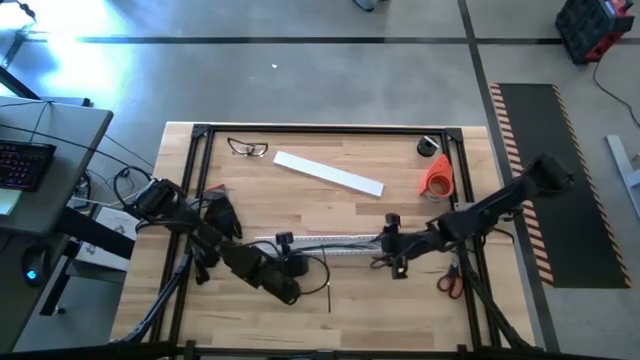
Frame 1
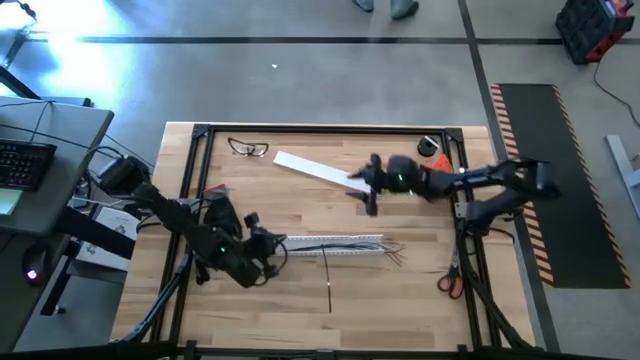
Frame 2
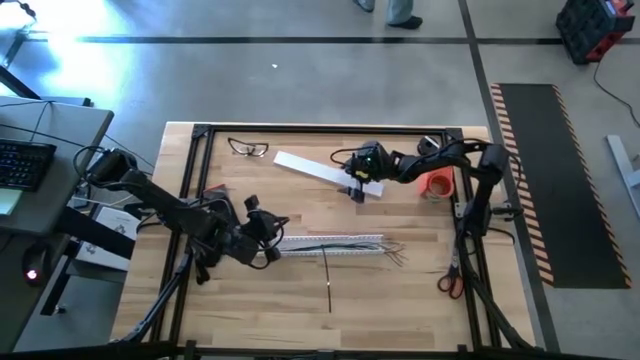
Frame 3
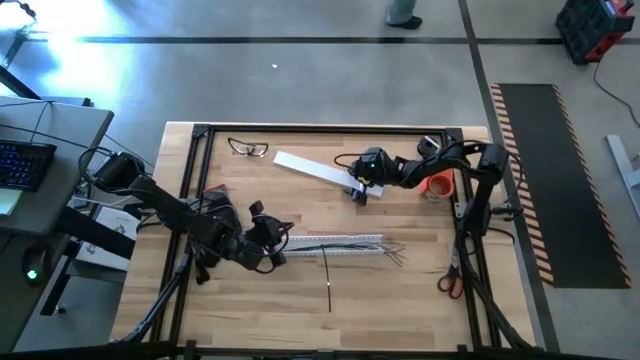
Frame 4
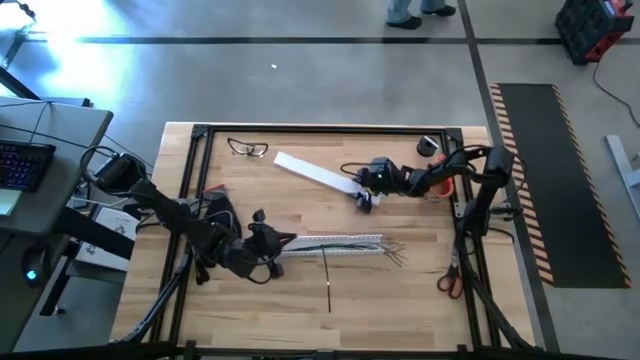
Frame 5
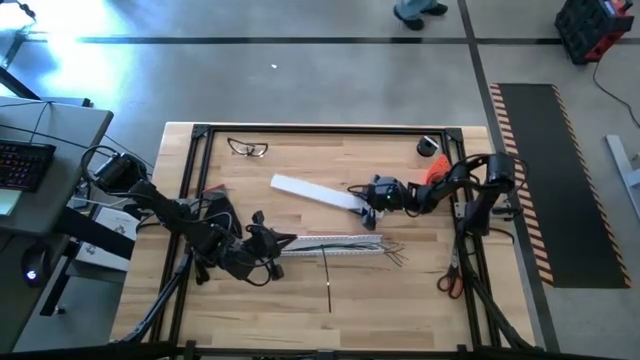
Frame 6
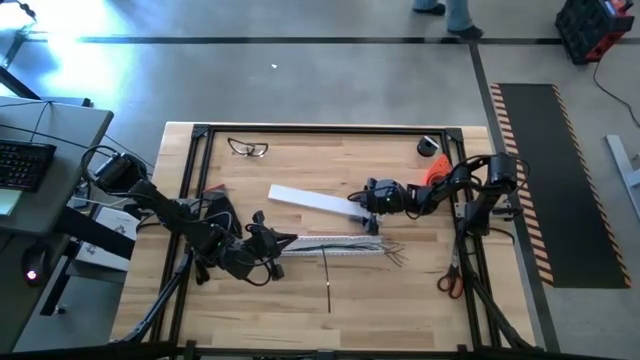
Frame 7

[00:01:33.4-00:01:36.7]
Task: Ziptie cables
Insert the white cable duct cover into the white cable duct

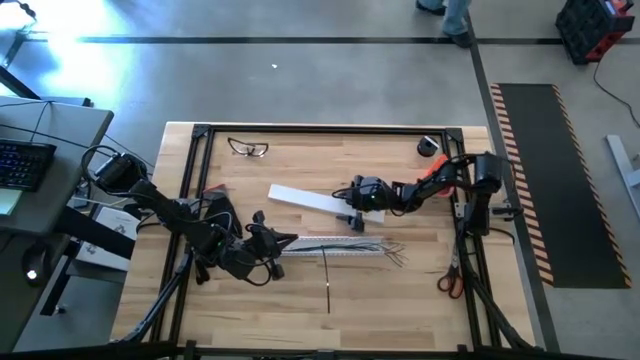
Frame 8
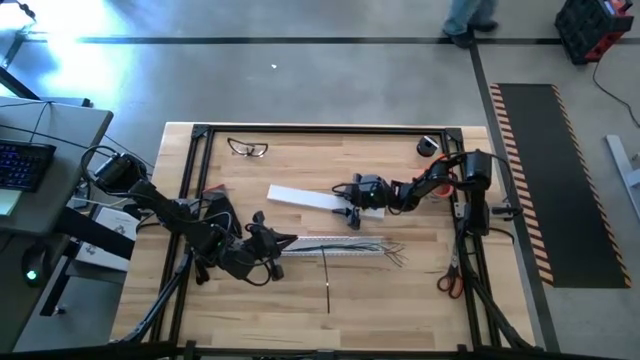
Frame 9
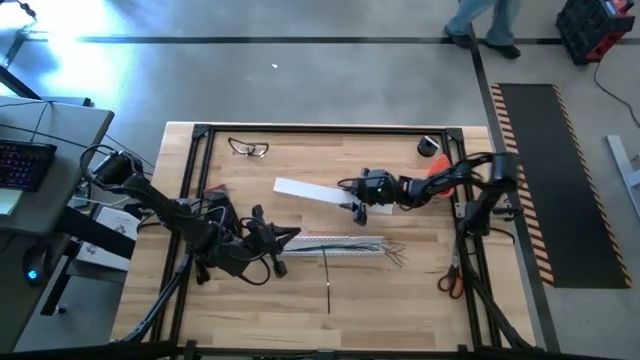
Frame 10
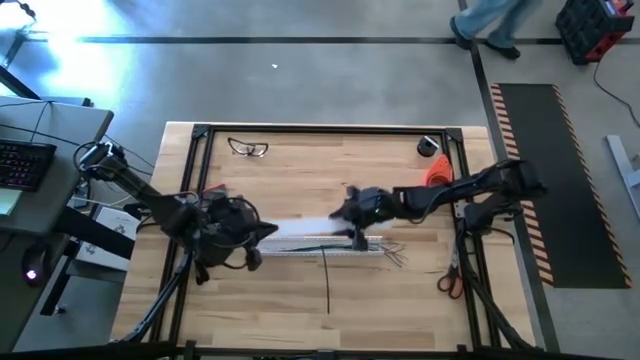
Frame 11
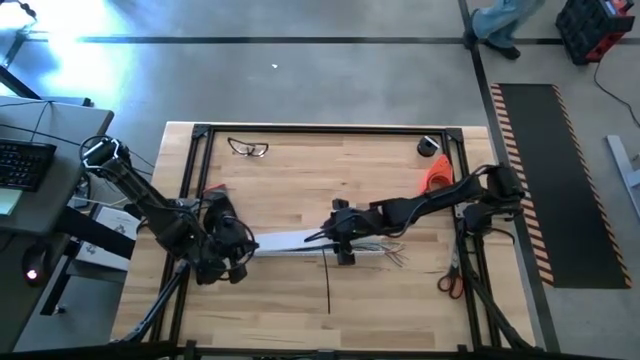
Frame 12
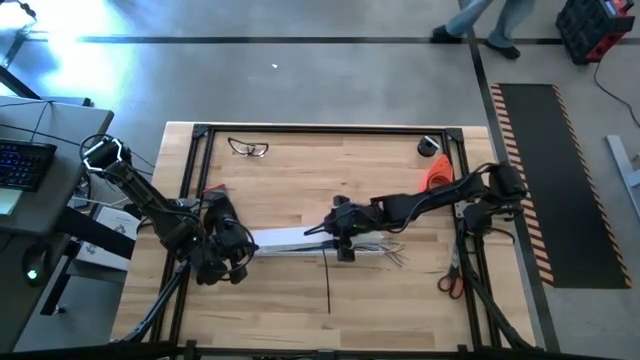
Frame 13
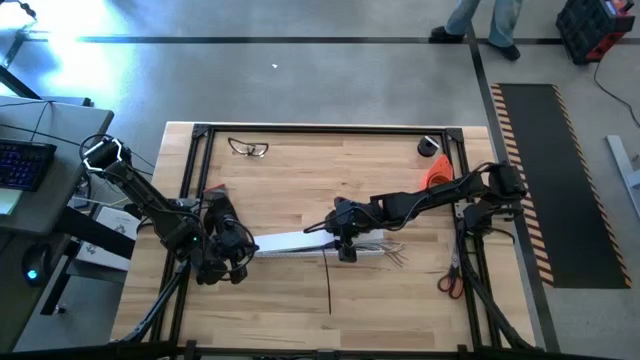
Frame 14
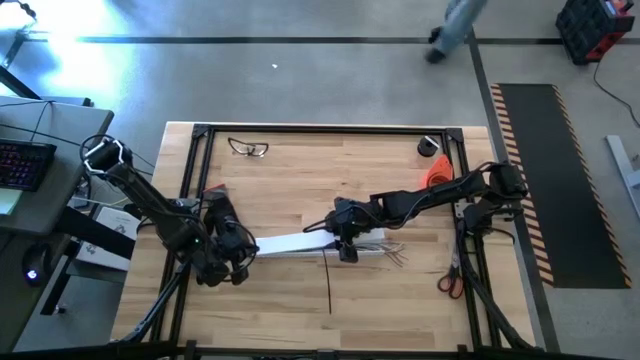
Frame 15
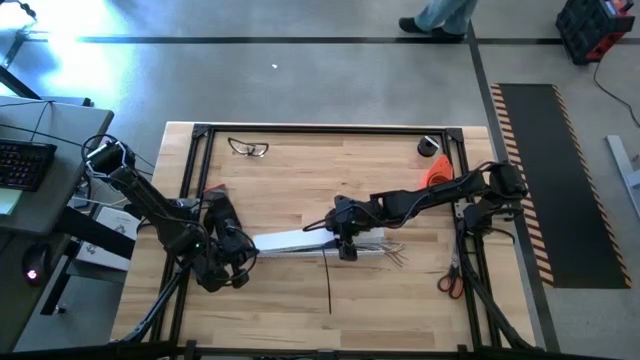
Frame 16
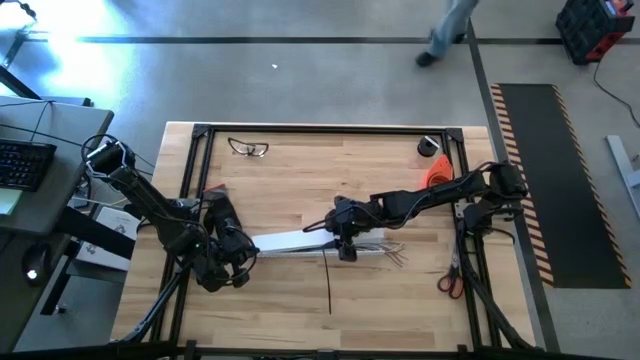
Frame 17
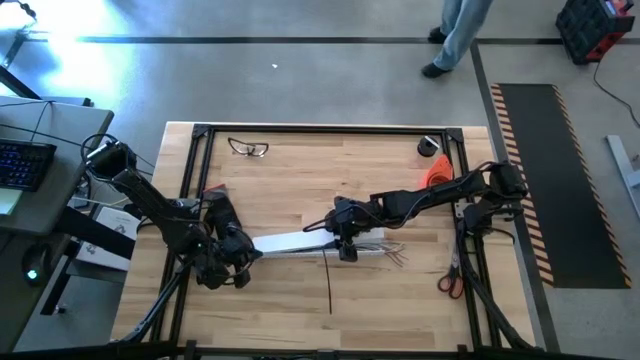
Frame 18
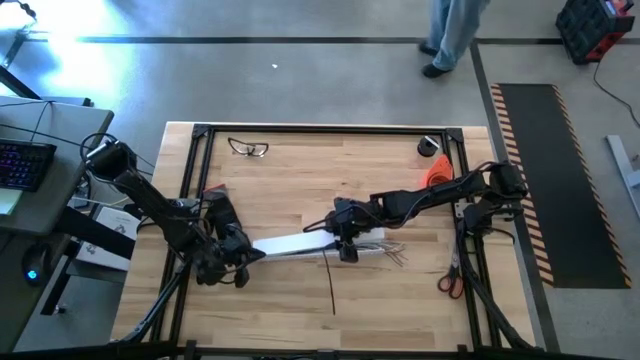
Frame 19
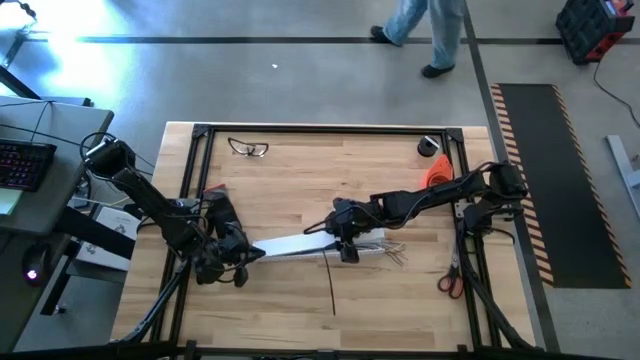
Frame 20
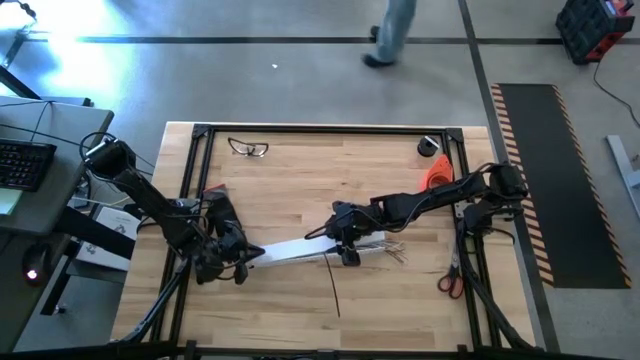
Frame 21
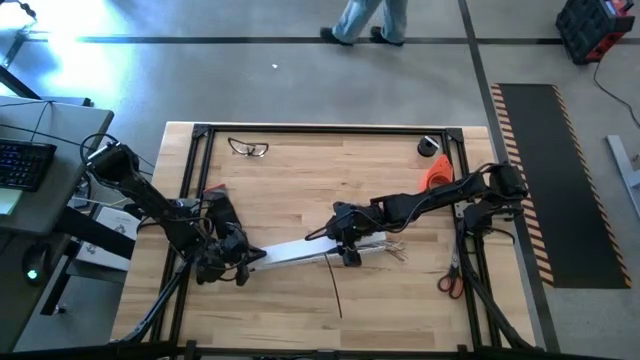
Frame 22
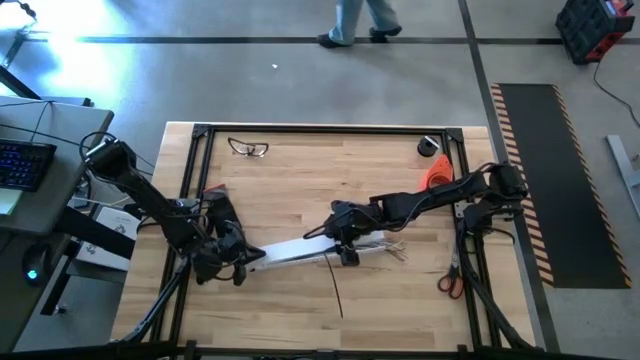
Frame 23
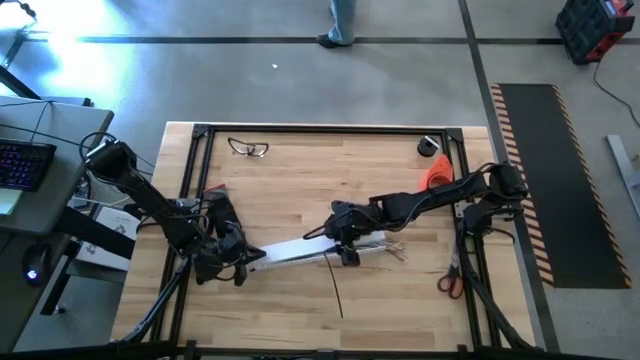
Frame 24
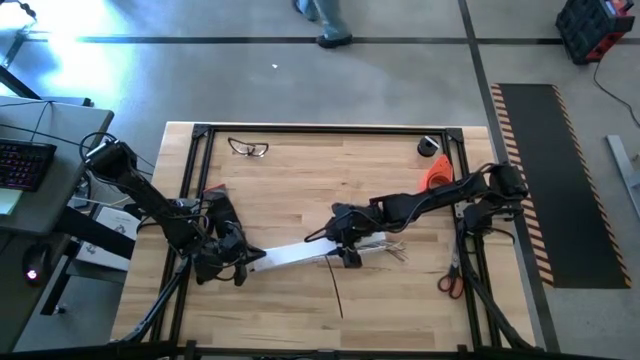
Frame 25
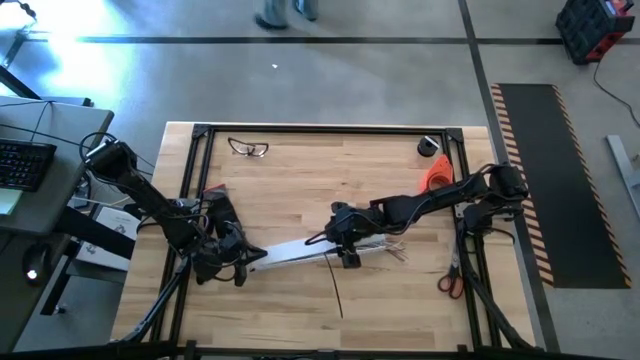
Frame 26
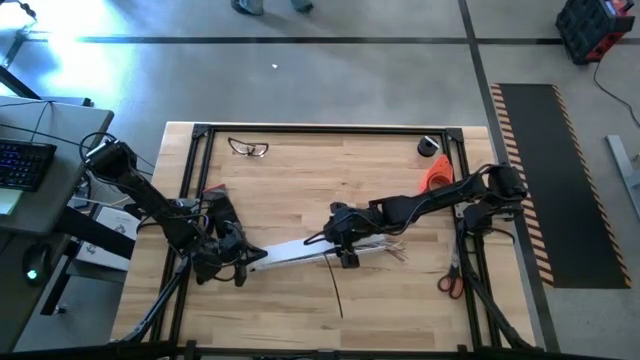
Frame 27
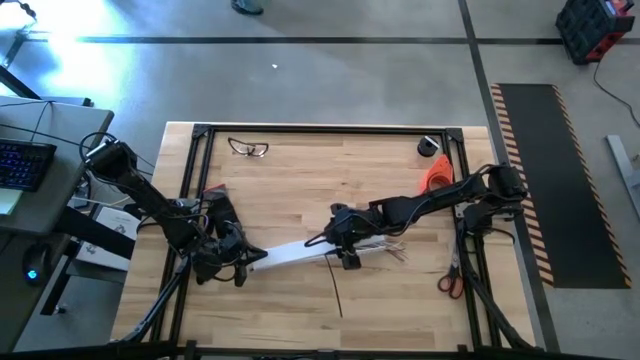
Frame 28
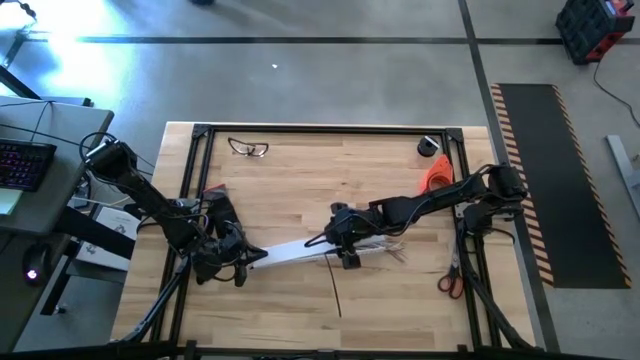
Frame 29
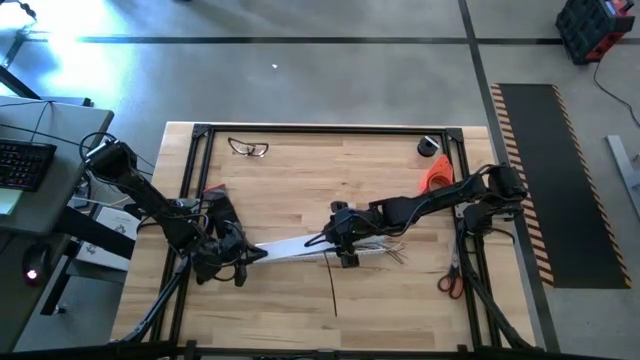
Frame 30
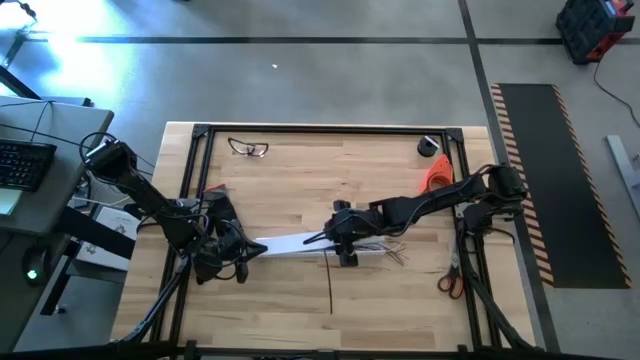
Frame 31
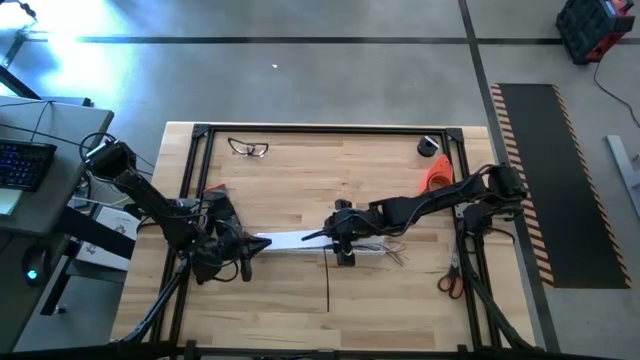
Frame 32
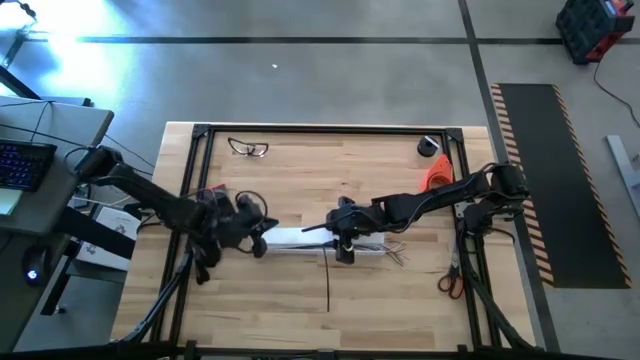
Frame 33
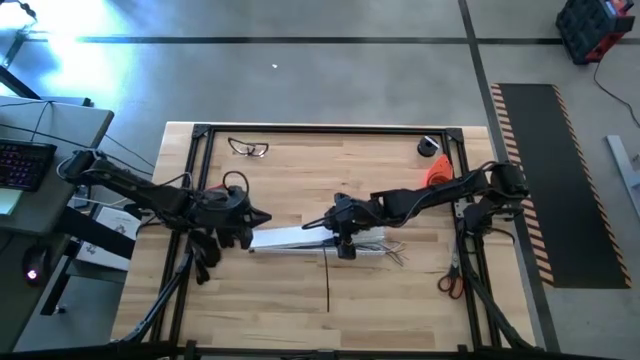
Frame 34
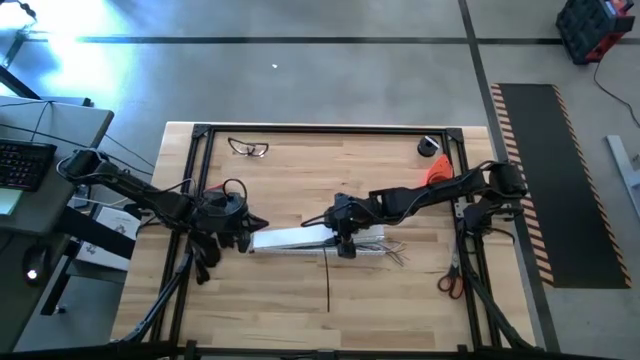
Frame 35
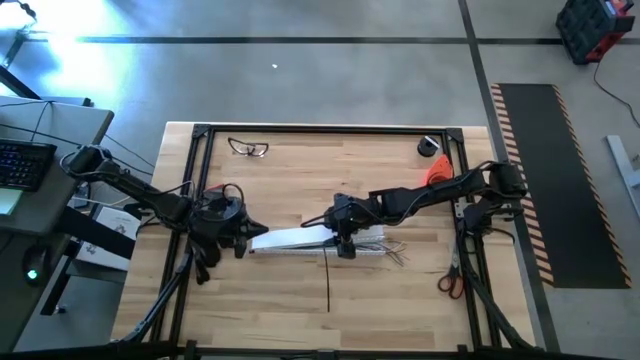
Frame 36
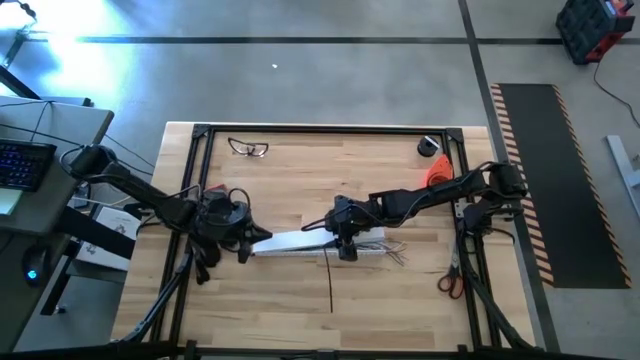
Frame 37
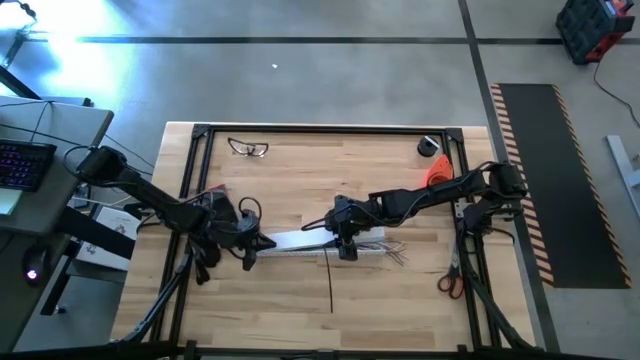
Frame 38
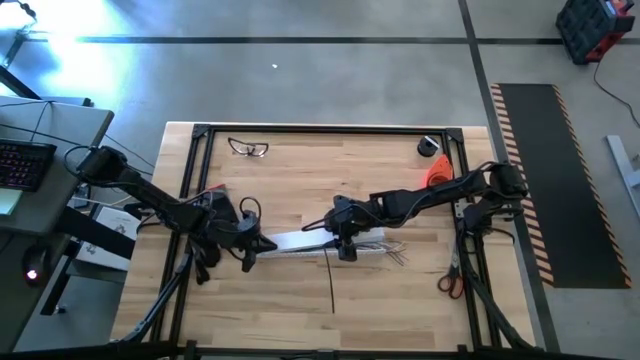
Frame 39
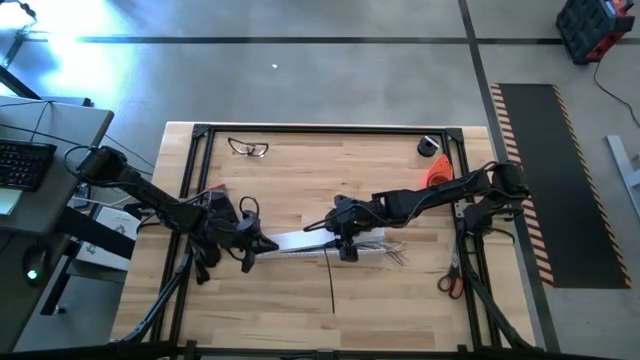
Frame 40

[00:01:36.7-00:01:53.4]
Insert the white cable duct cover into the white cable duct
